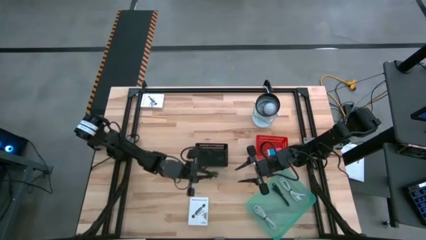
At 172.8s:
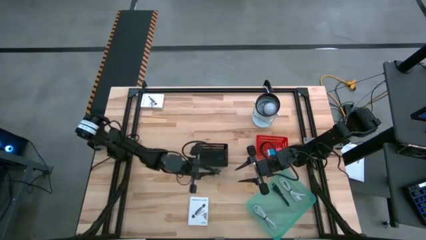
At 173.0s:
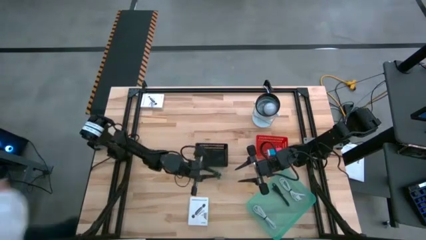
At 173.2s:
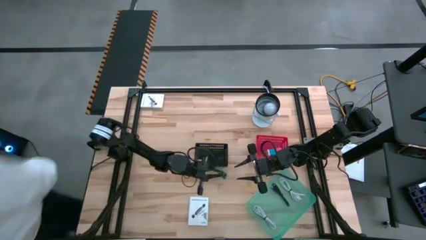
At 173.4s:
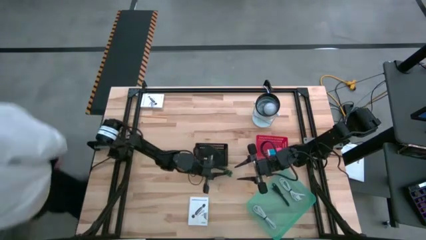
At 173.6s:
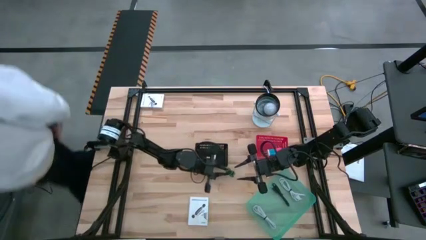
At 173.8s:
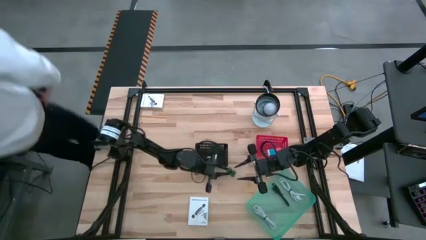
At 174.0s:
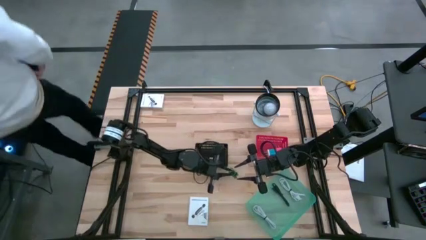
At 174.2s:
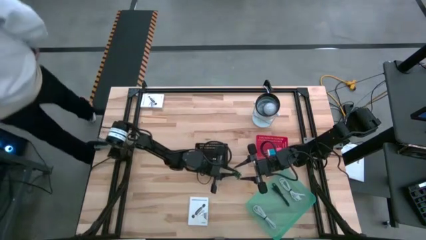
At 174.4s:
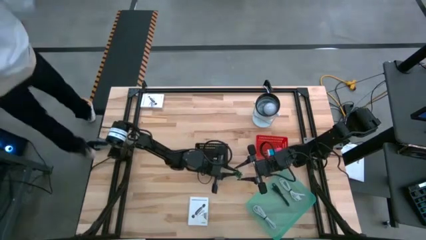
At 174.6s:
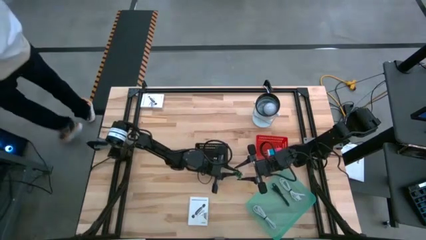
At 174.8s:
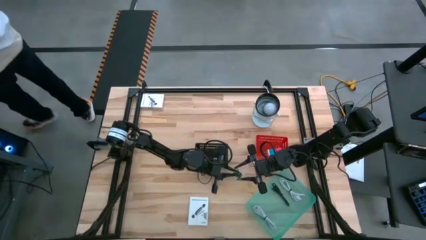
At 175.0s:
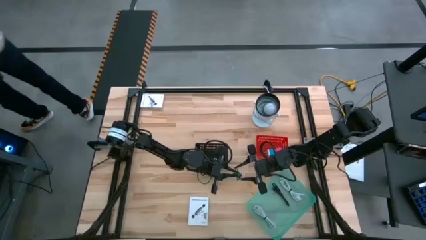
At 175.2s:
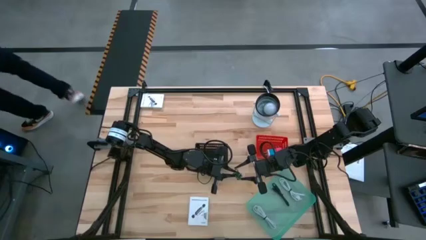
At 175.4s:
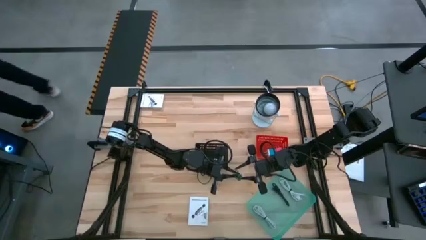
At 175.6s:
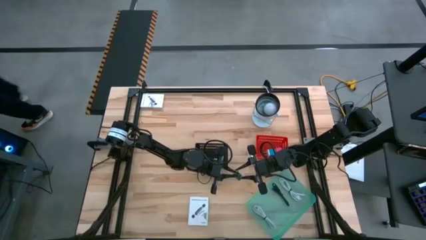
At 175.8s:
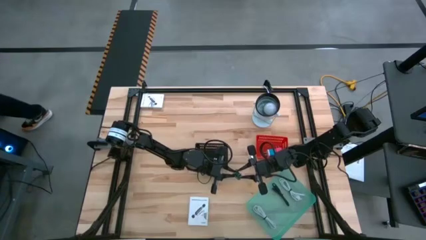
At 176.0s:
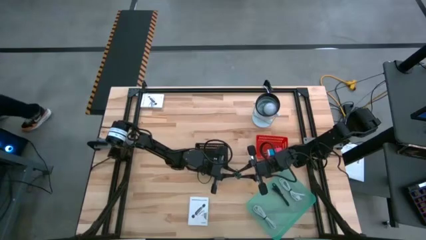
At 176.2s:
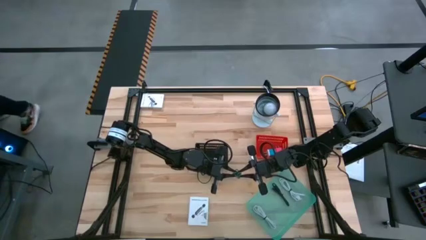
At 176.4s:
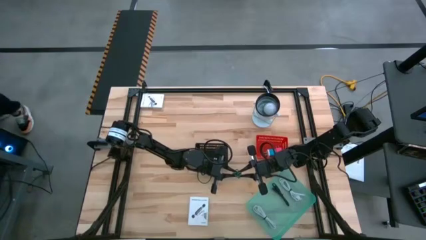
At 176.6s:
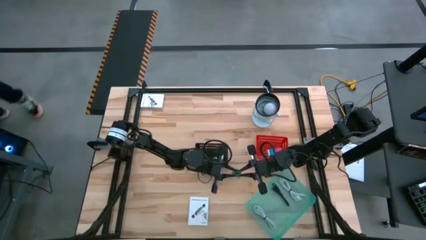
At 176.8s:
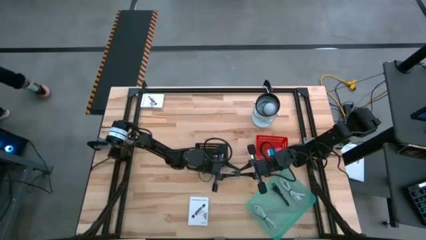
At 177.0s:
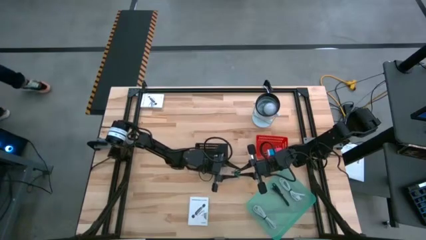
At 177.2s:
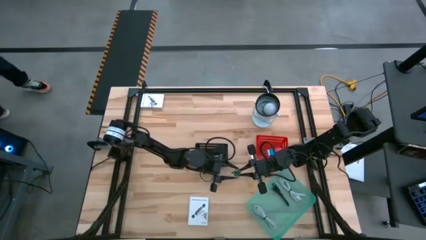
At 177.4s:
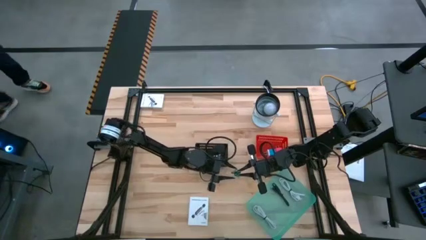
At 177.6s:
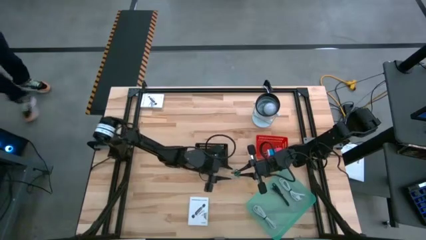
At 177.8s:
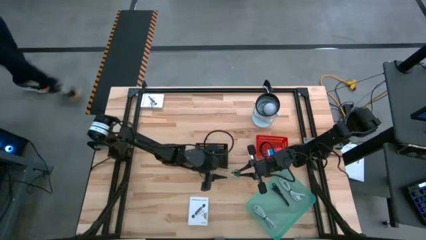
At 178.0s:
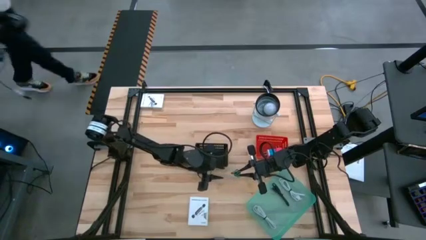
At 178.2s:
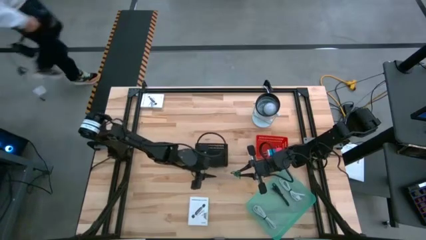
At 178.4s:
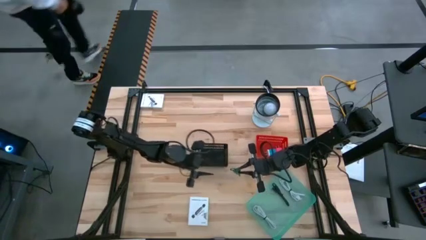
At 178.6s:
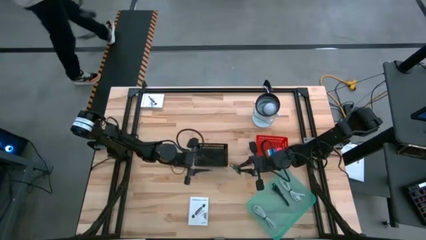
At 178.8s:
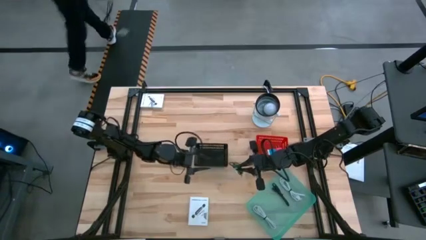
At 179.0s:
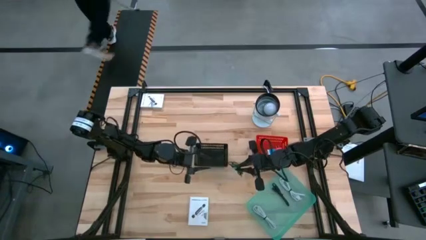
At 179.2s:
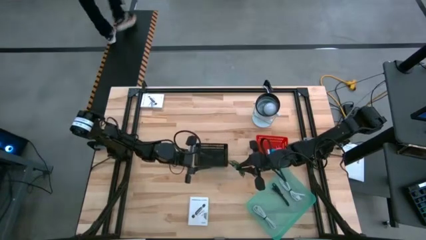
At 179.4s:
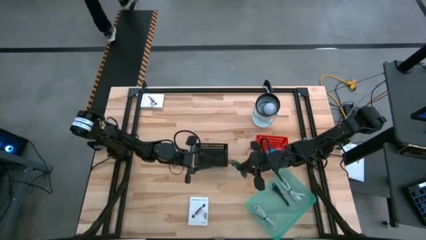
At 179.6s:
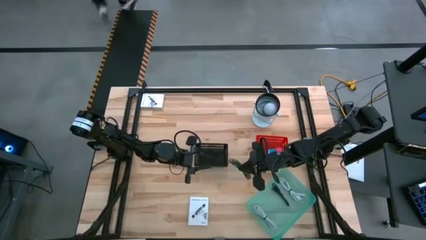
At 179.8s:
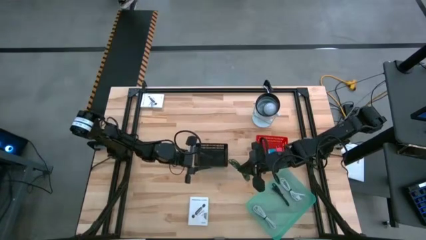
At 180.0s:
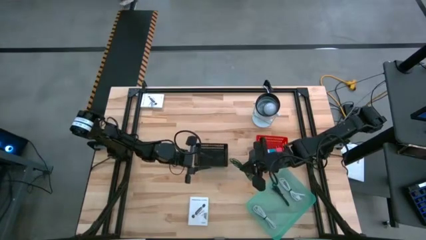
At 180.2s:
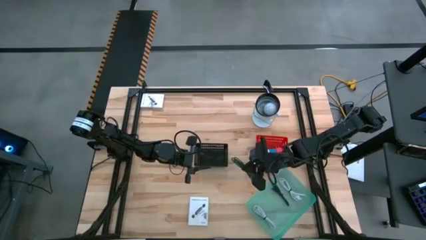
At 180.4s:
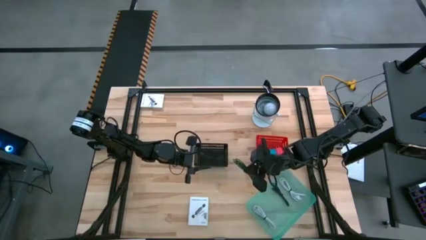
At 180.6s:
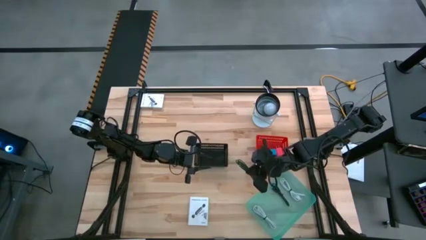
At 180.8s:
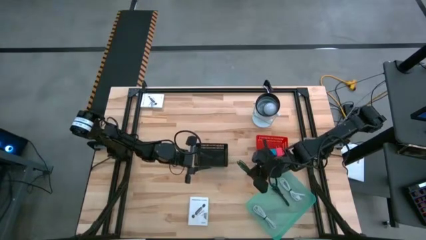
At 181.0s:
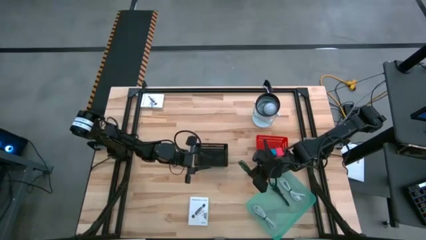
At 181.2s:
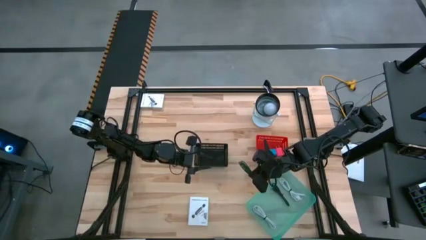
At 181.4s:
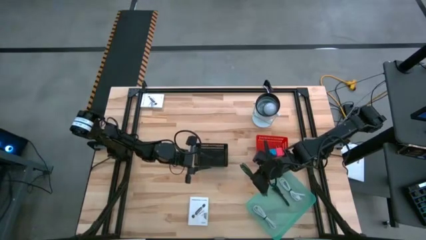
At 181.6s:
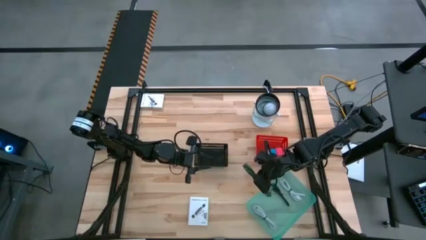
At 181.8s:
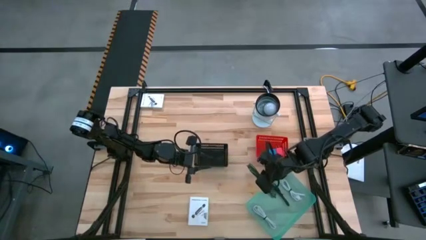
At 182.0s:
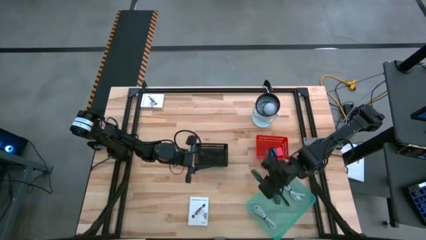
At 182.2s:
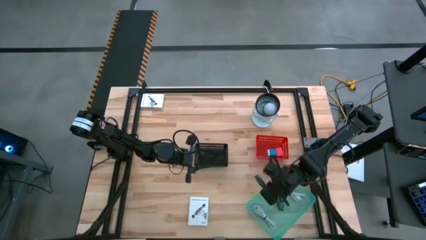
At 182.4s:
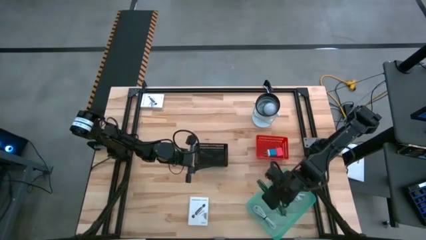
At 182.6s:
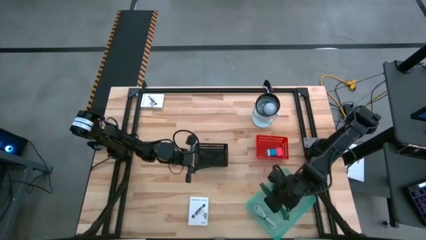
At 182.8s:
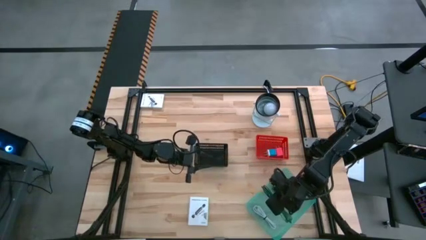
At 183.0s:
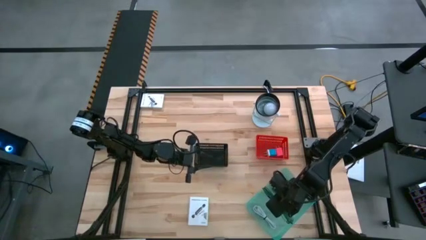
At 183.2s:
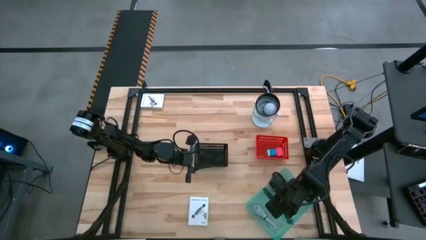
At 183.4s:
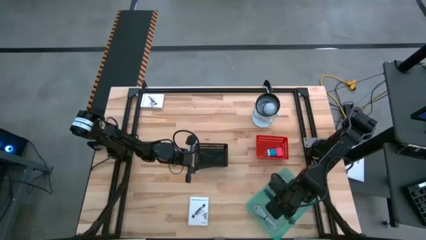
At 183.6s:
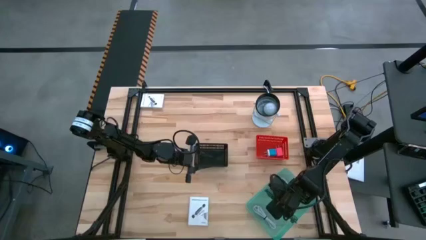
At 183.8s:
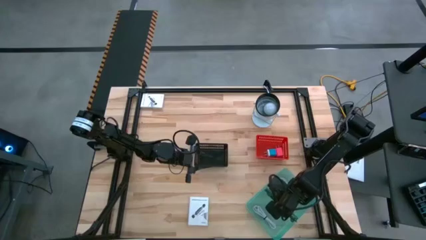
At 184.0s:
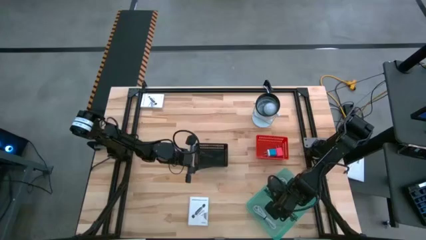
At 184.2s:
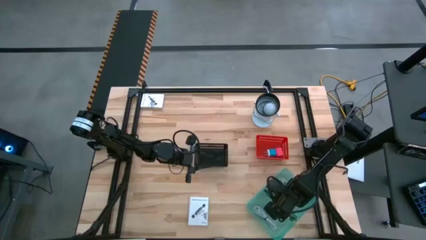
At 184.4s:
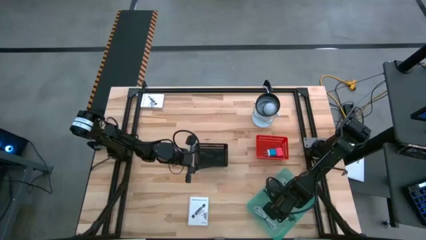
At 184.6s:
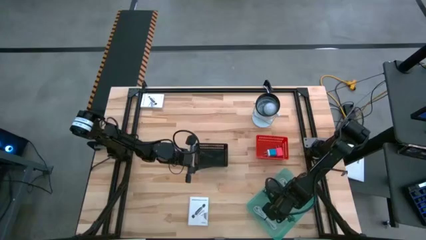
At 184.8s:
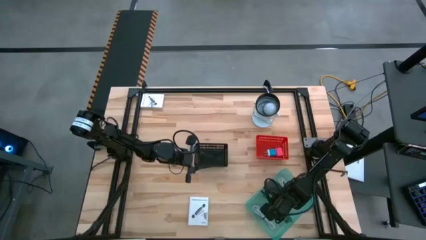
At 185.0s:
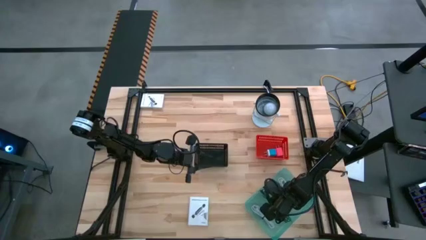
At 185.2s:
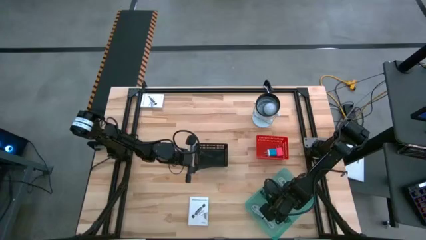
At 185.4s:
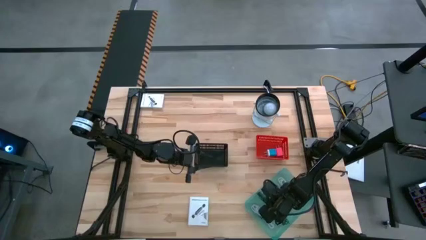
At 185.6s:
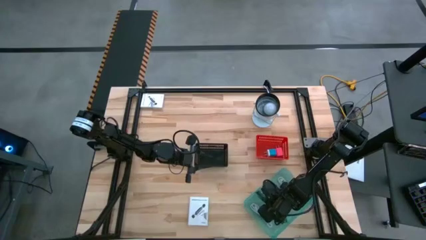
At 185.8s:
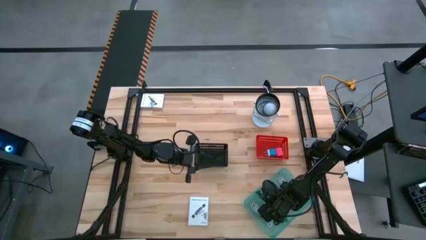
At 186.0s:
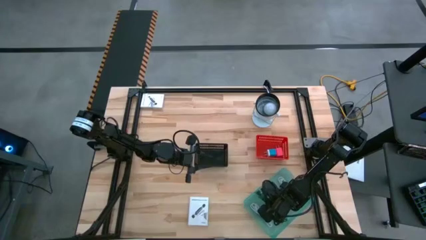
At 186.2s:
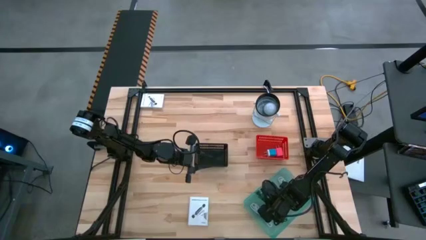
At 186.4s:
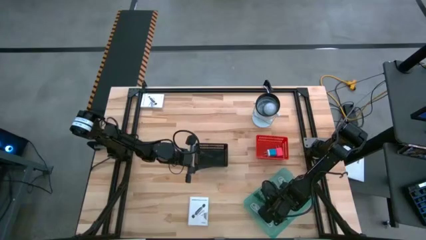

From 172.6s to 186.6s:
Task: Pick and place items into bin
Put the green charger cable into the blue bin

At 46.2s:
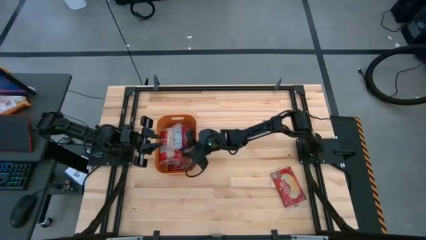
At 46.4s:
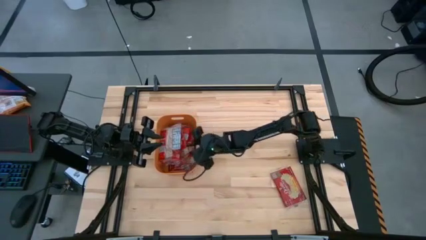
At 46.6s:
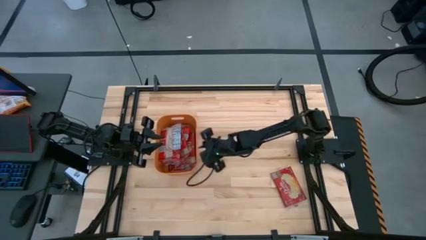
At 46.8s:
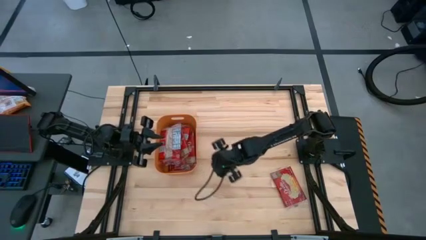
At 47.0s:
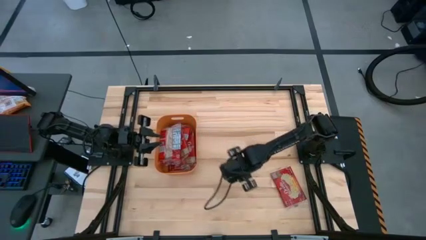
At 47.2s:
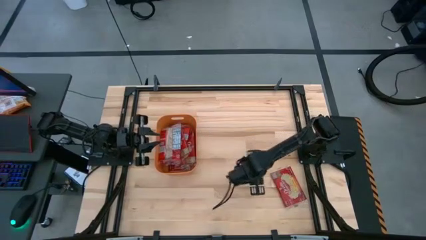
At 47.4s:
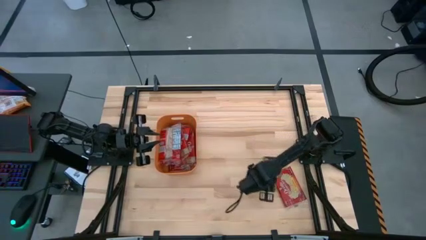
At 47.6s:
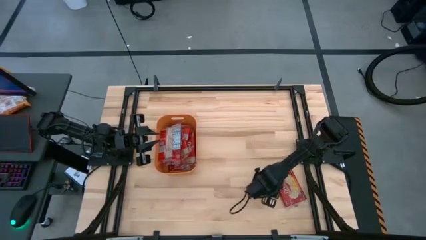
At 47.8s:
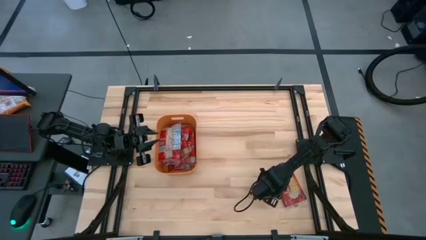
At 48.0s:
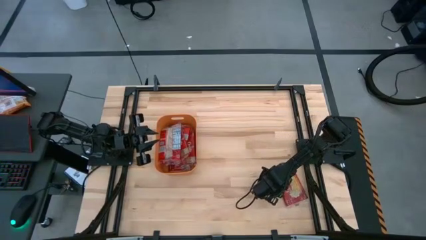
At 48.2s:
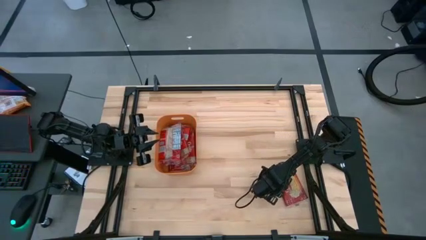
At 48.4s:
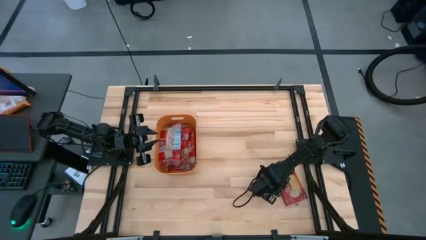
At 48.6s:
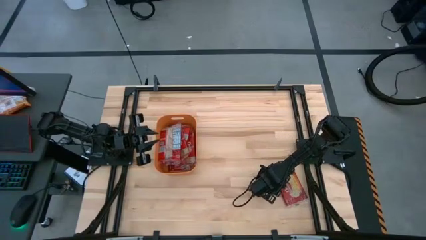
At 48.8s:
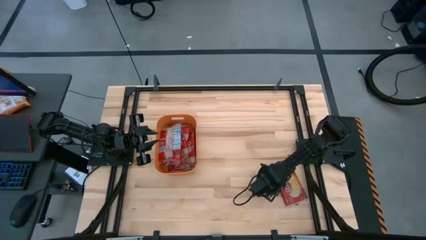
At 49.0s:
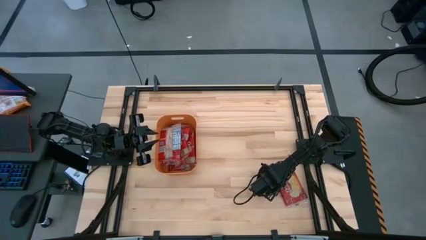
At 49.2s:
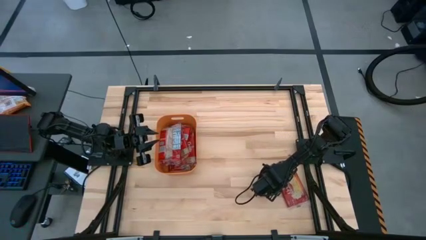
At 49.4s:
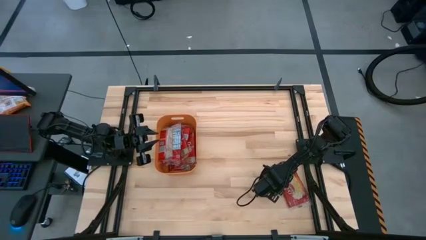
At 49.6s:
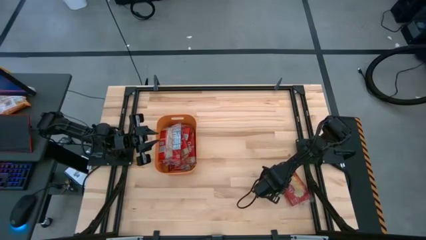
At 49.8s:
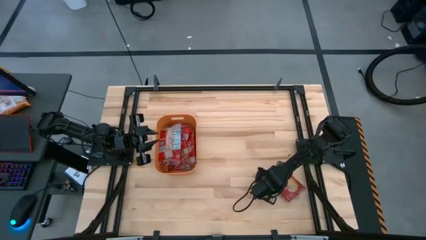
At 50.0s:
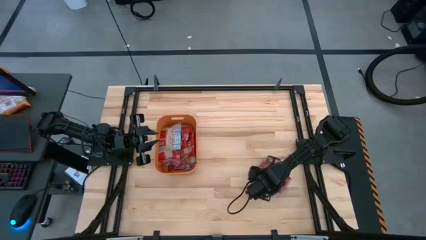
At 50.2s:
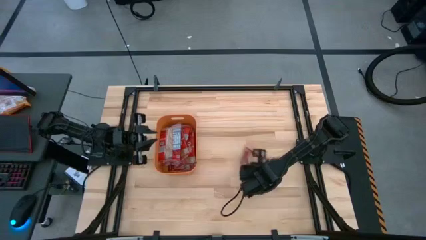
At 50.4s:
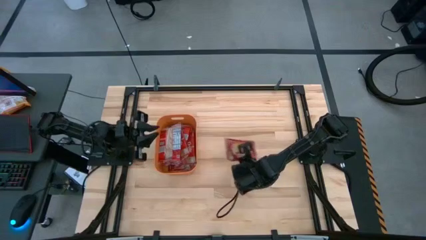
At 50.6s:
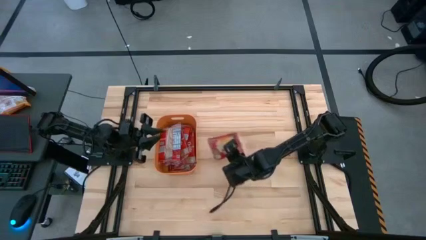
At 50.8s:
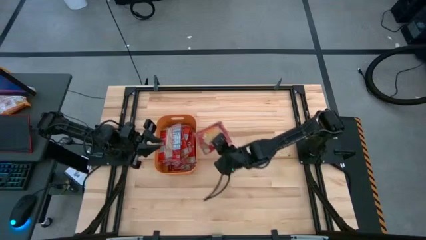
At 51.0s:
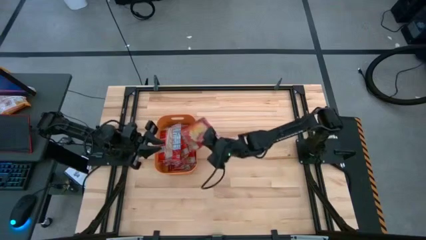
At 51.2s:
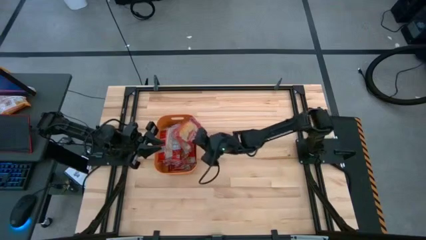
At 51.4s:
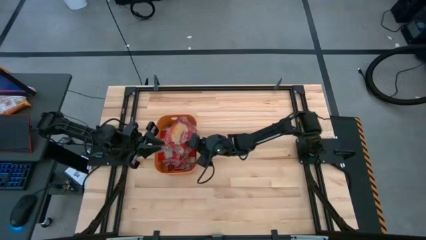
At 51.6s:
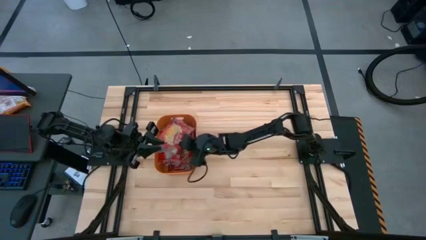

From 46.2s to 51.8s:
Task: Sort popcorn bags into baskets
Put the popcorn bag into the orange bin
